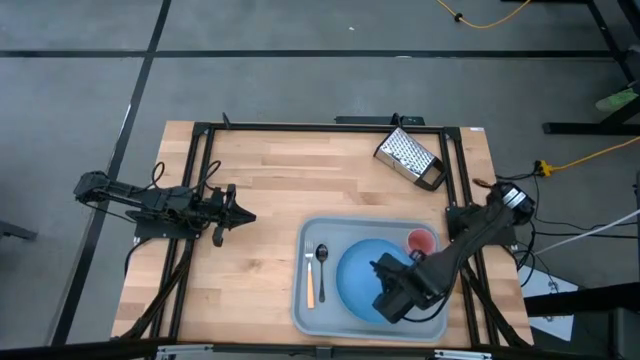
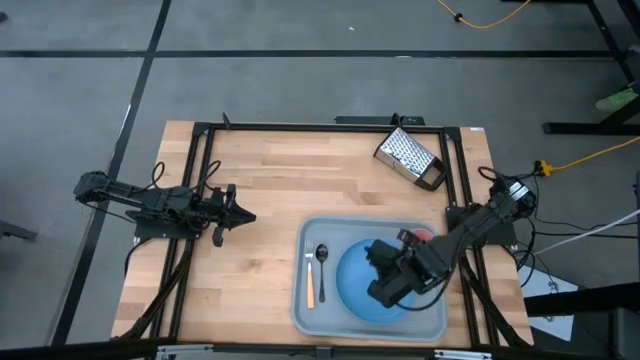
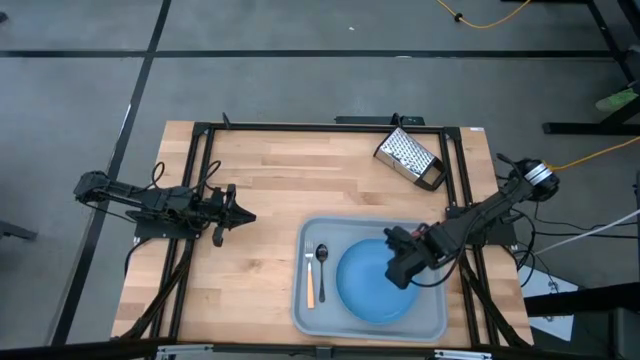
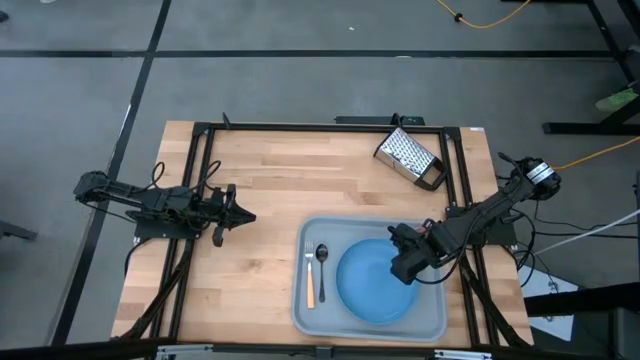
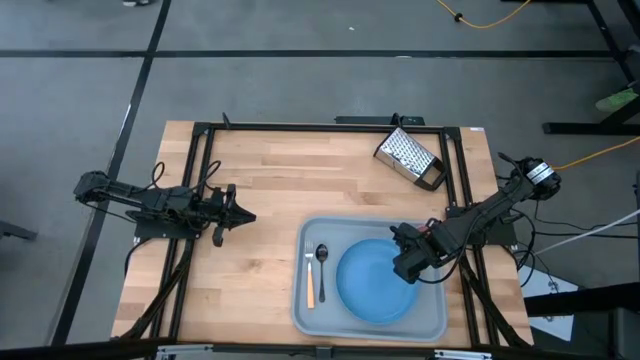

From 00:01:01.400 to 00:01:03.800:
Task: Pick and place plate/cup/fork/spoon on tray
Adjust the pink cup on the gray tray

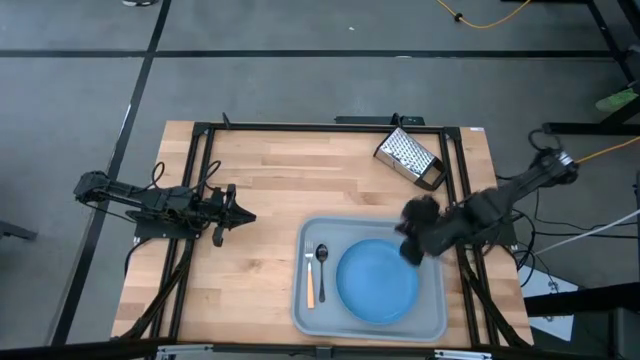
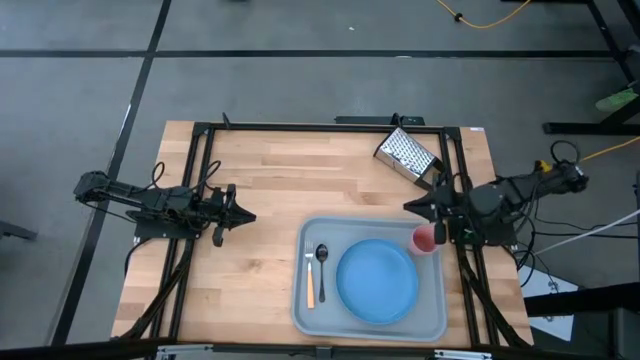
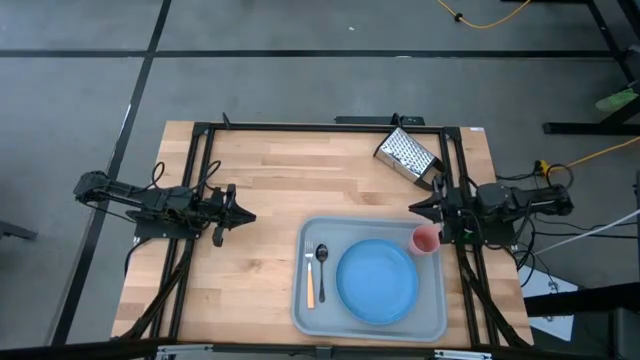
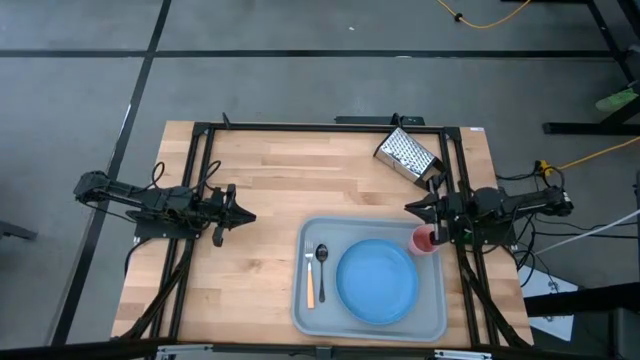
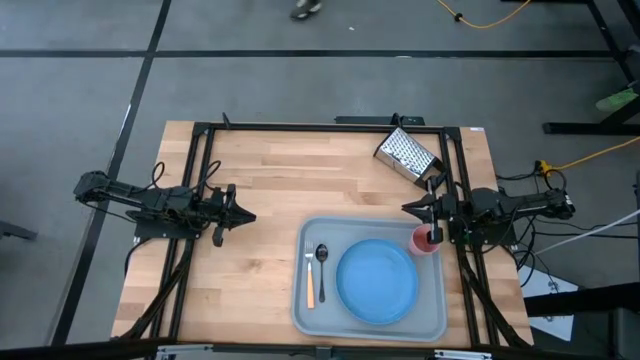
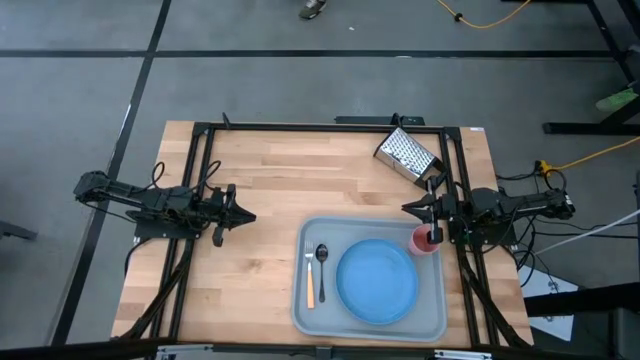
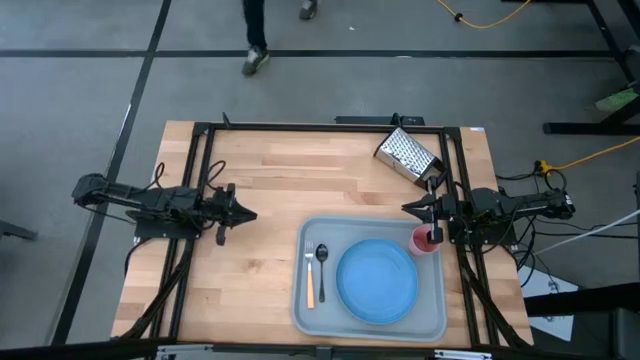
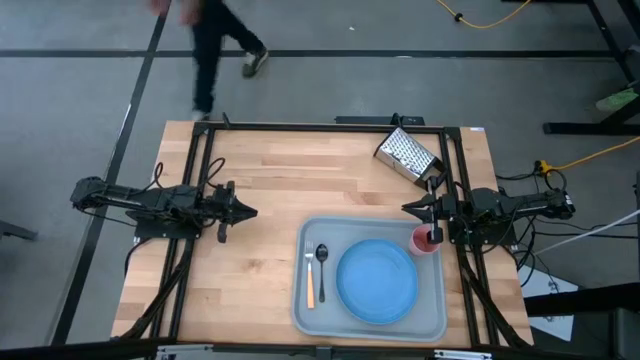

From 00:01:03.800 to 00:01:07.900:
Return to Home Position

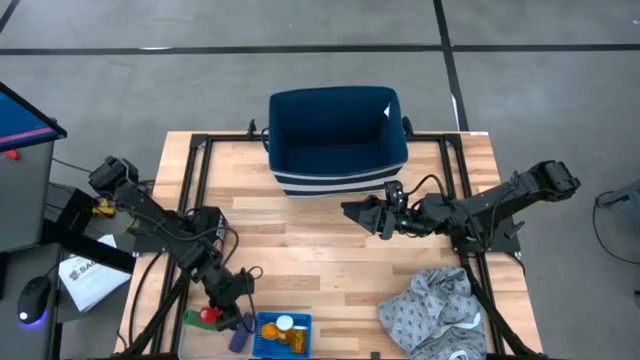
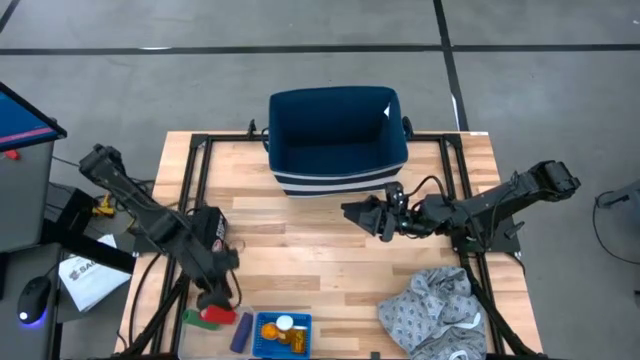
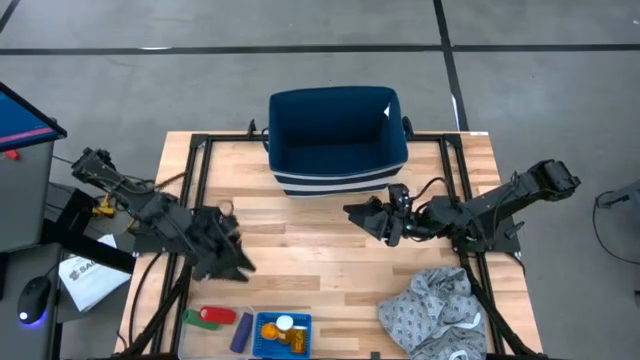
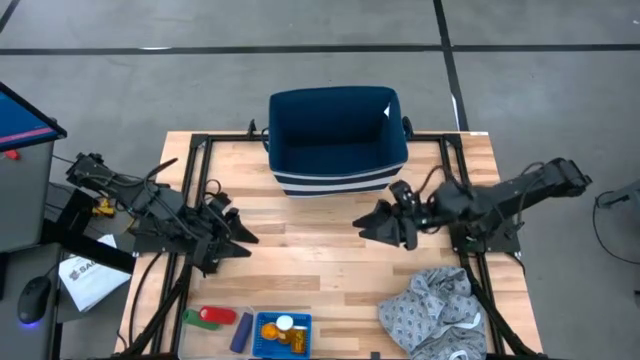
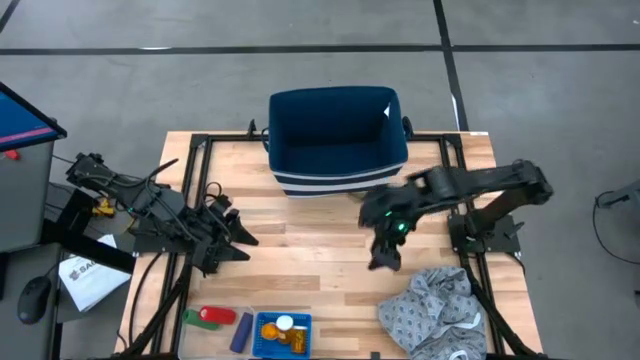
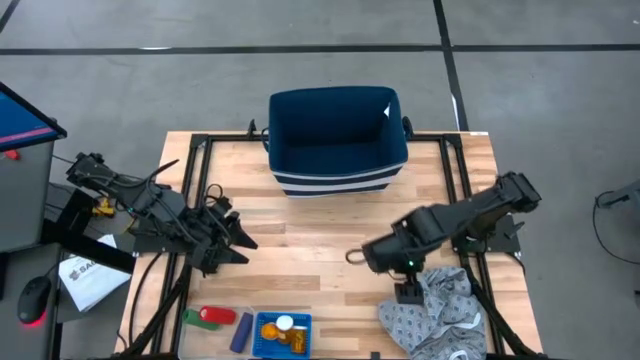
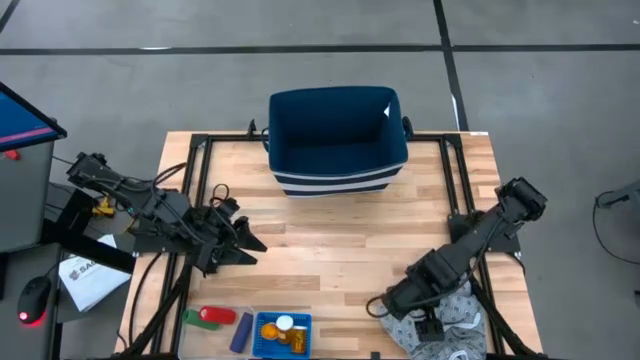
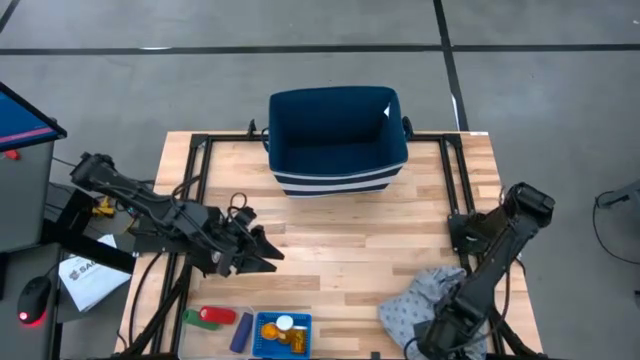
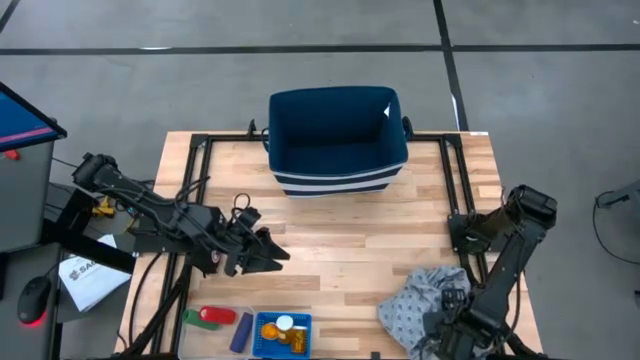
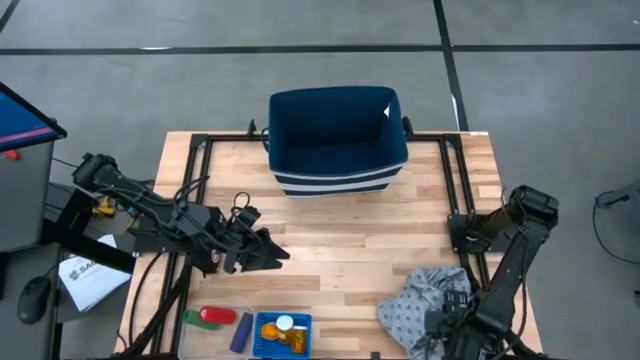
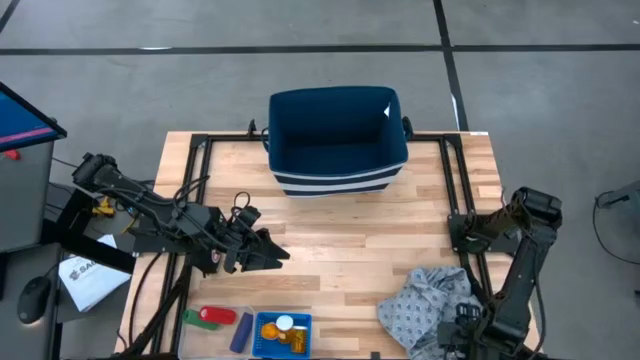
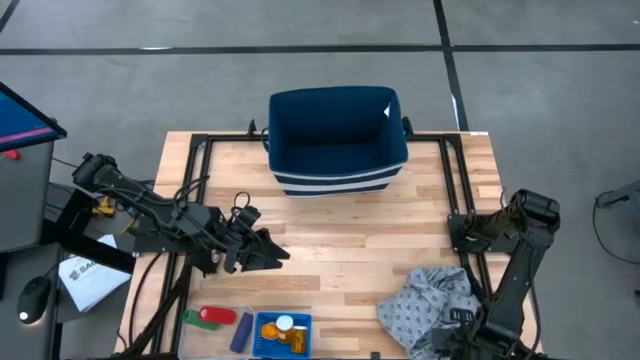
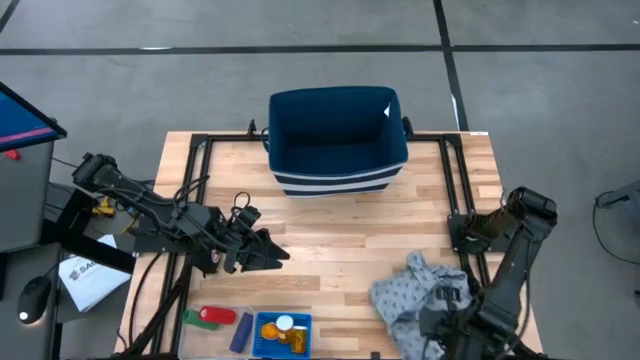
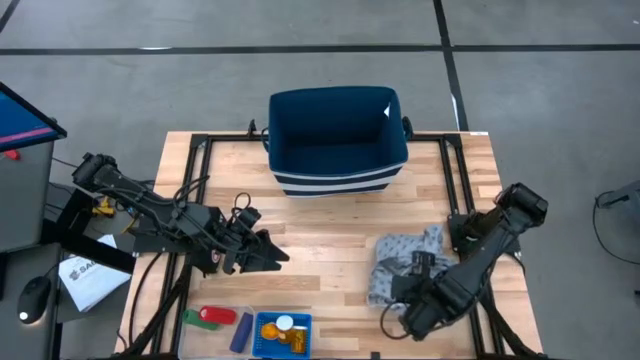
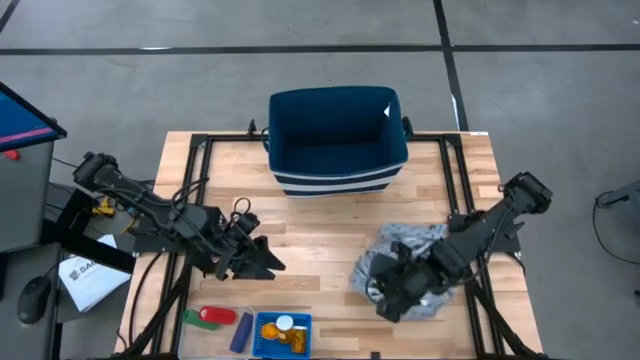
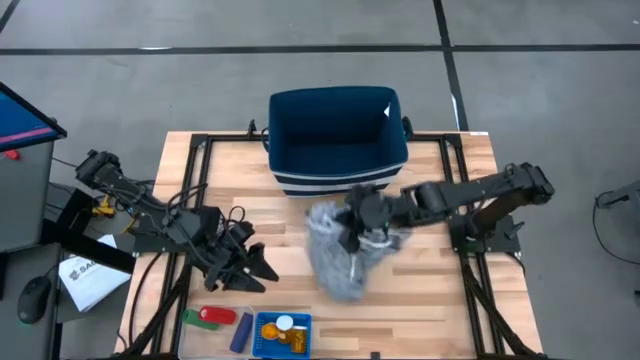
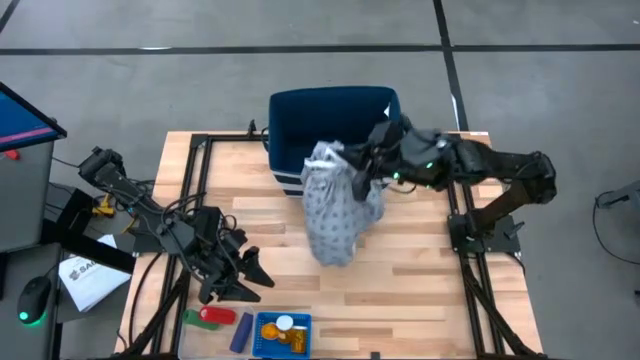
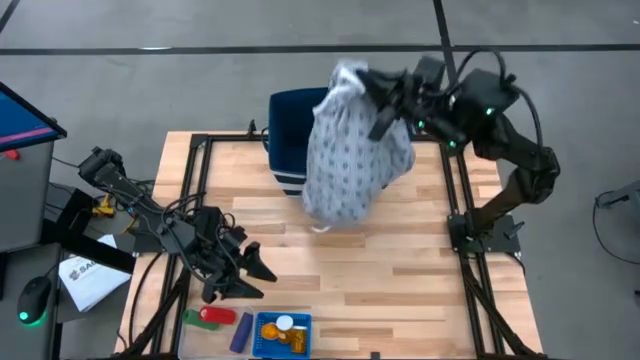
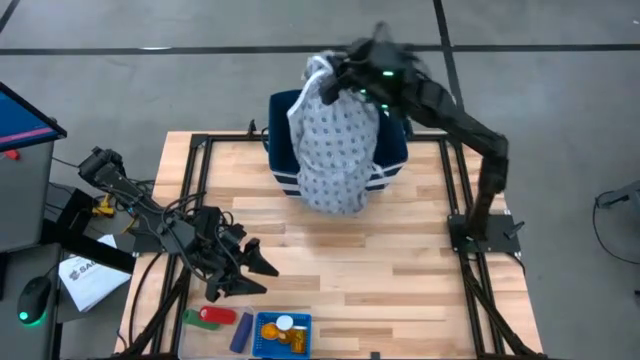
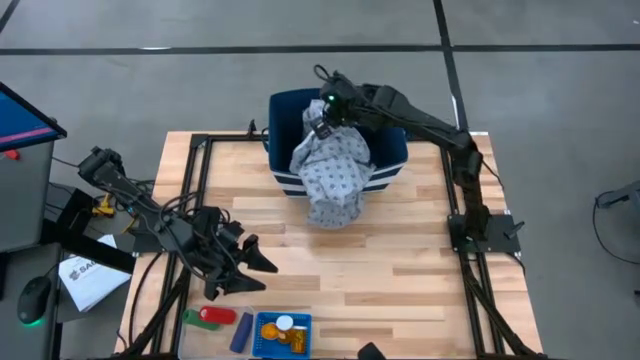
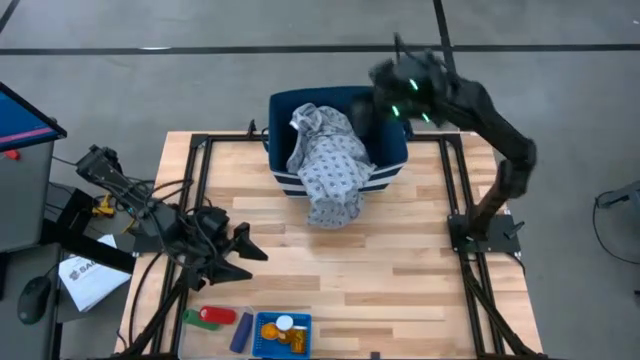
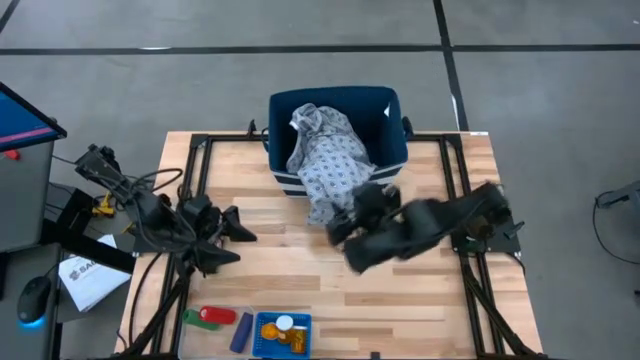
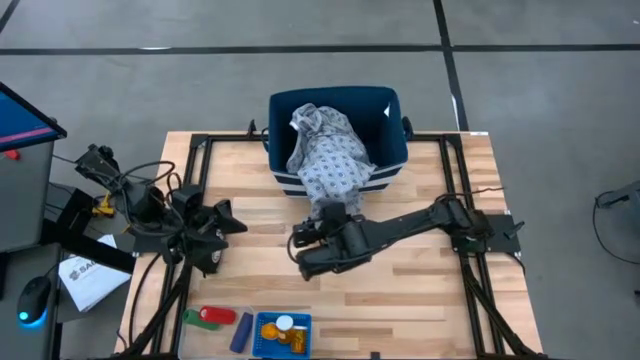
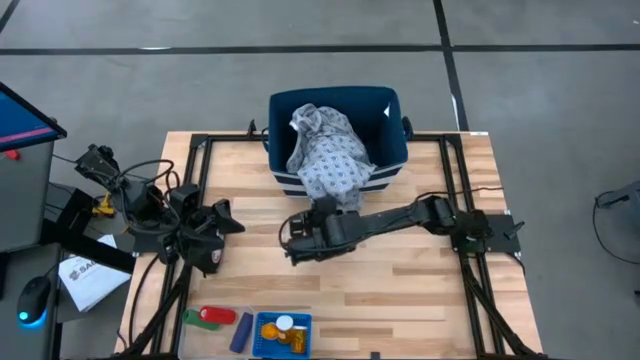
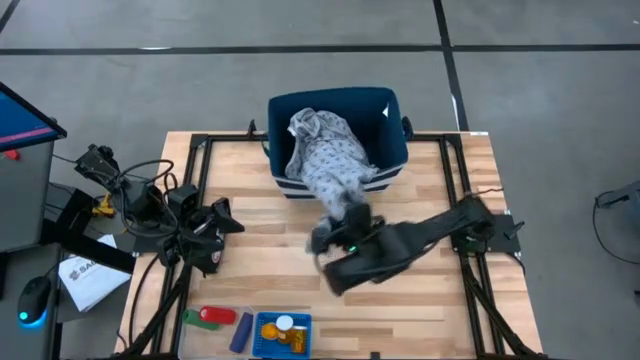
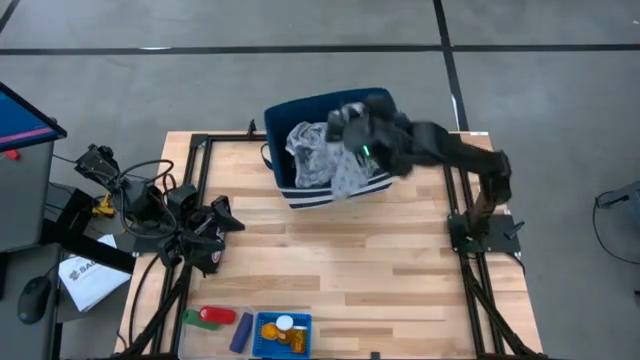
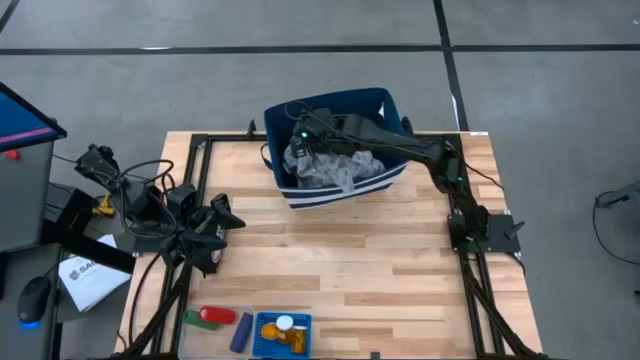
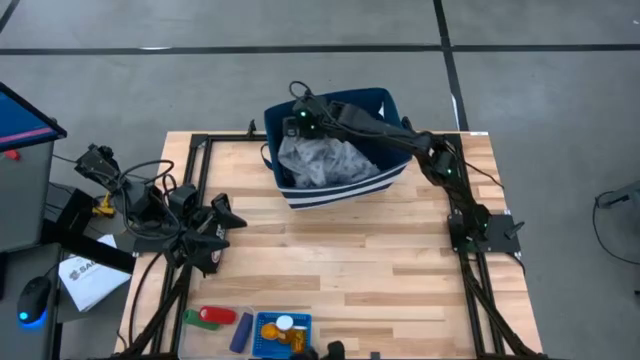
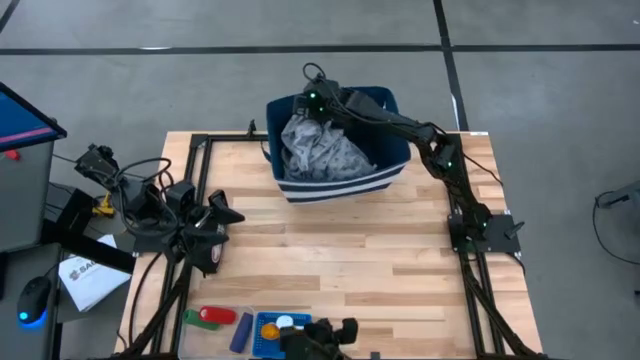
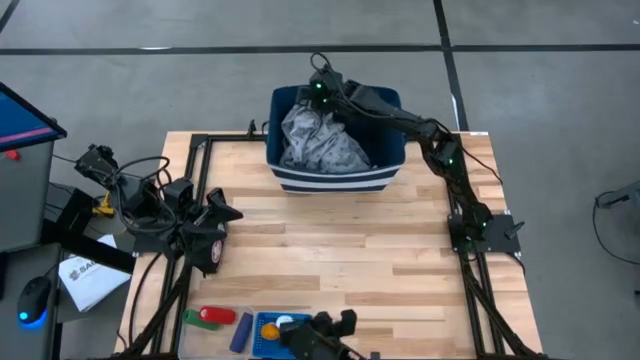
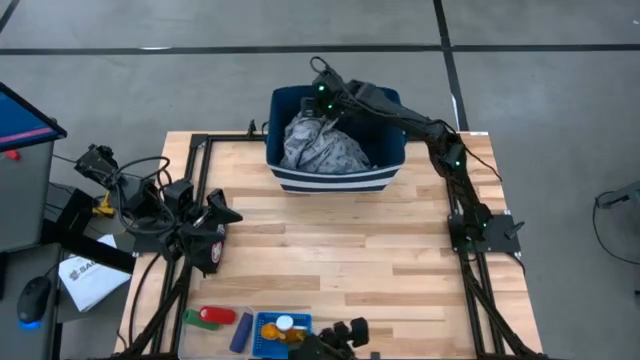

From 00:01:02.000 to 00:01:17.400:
Task: Pick & place medical supplies in basket/bin
Put the gray patients gown into the blue laundry organizer
